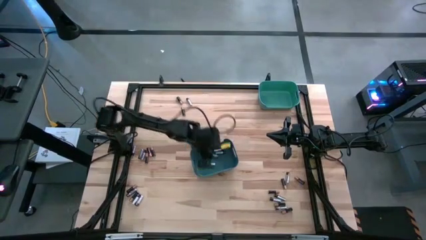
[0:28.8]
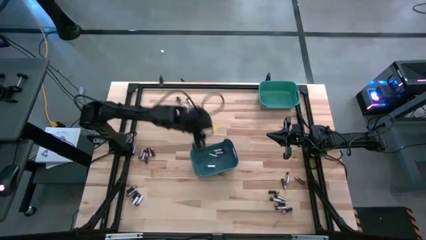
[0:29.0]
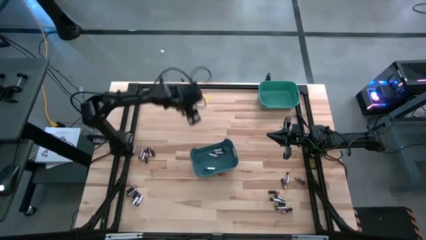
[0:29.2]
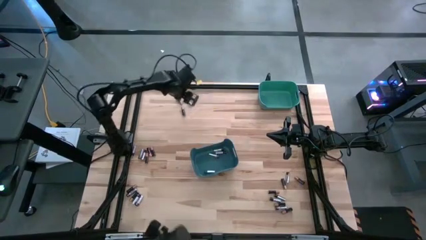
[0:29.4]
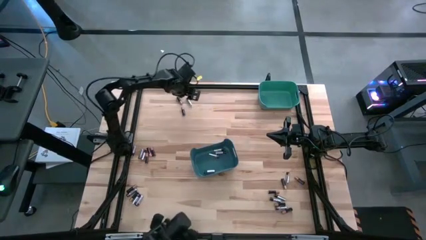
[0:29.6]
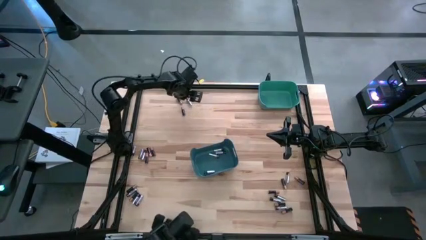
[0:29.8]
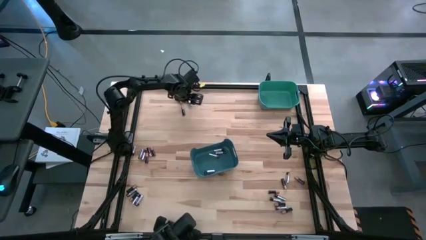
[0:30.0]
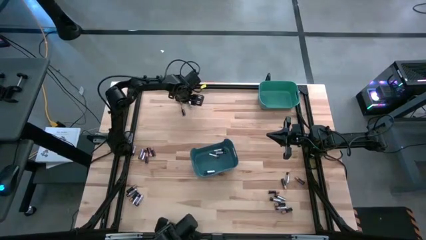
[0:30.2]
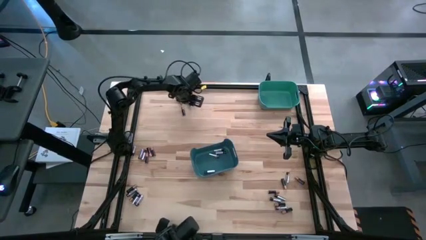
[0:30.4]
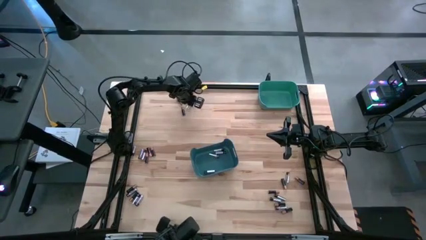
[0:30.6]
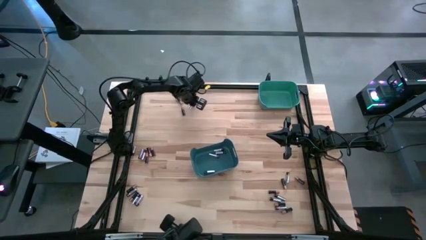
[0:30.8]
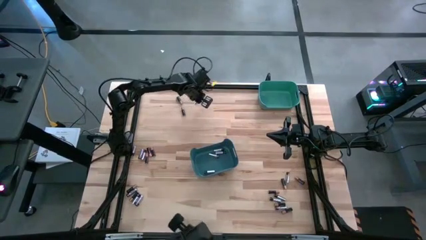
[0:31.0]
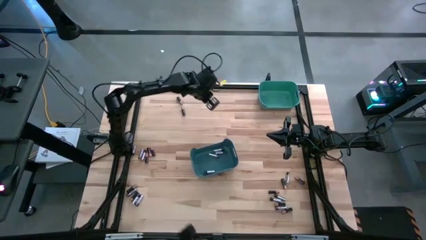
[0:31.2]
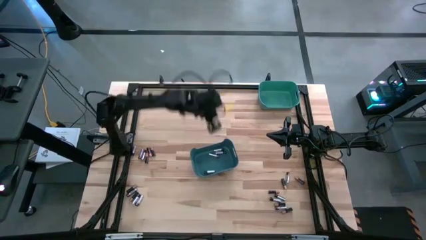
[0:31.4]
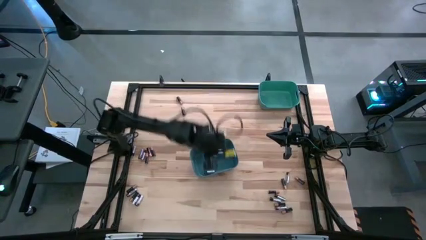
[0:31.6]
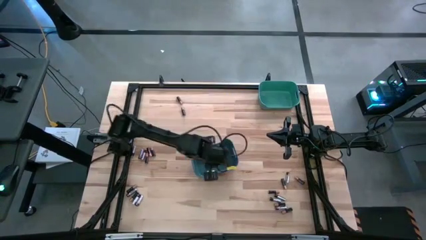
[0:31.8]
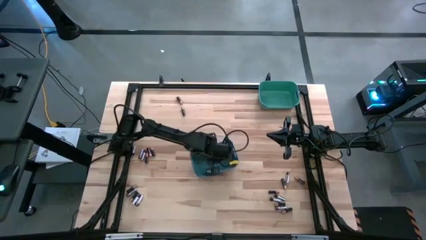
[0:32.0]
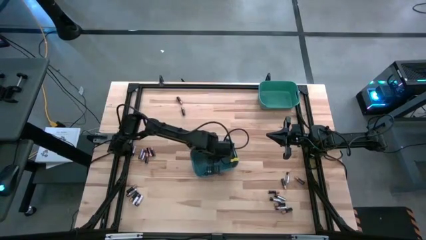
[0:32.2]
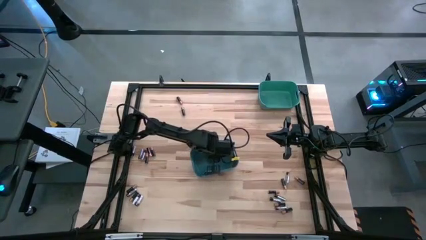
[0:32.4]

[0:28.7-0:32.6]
Task: Sort batteries
Put the silver battery into the blue bin

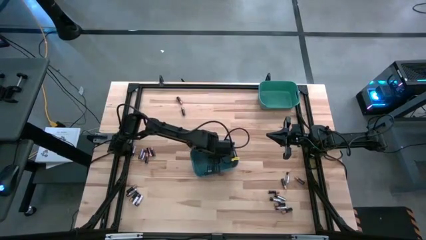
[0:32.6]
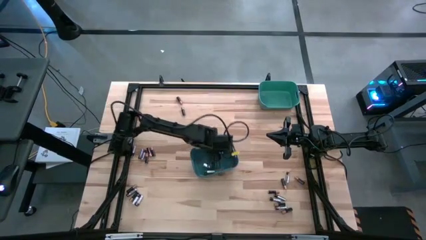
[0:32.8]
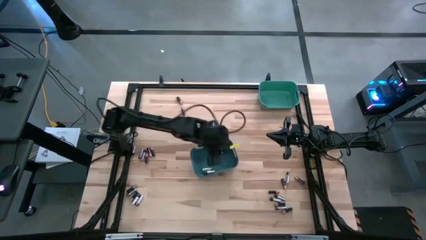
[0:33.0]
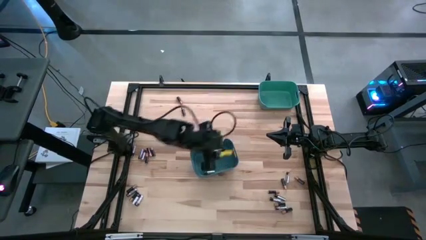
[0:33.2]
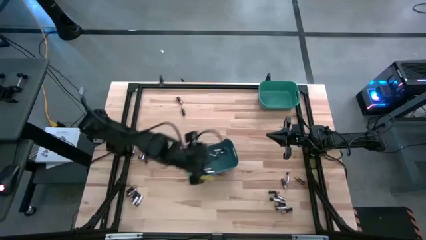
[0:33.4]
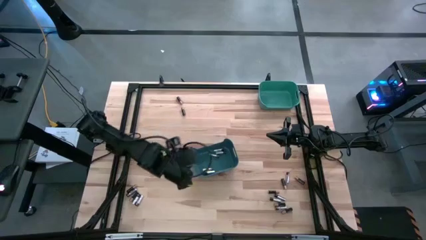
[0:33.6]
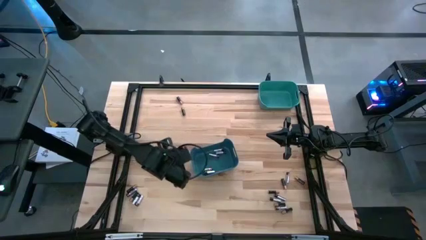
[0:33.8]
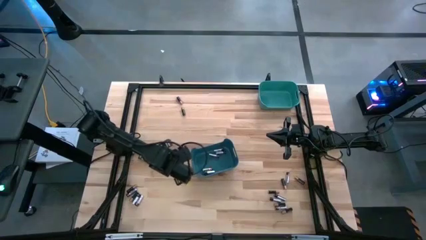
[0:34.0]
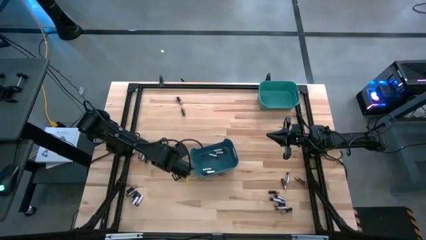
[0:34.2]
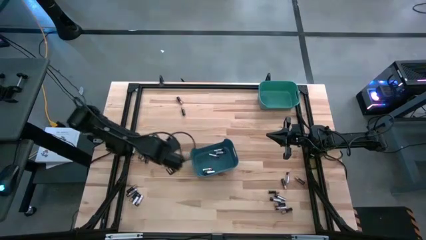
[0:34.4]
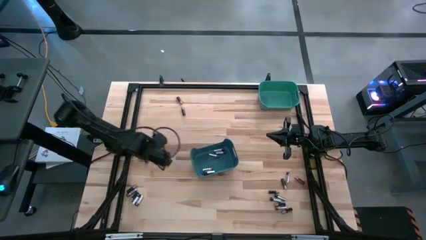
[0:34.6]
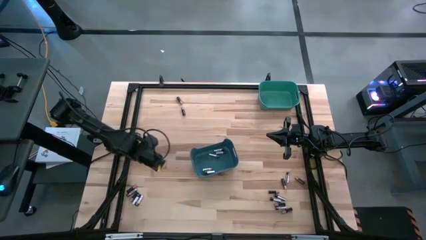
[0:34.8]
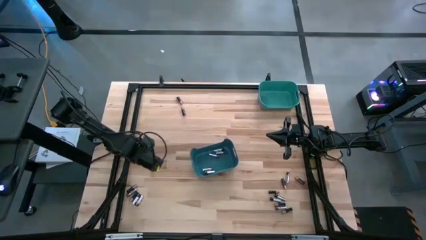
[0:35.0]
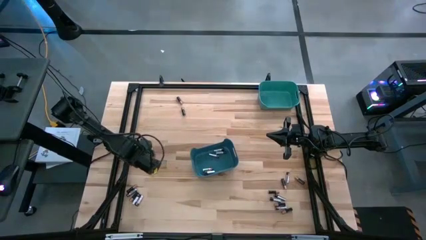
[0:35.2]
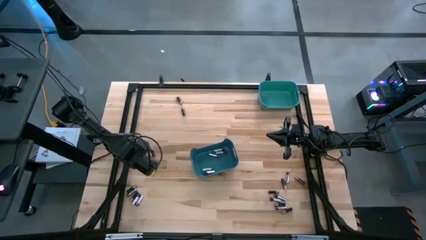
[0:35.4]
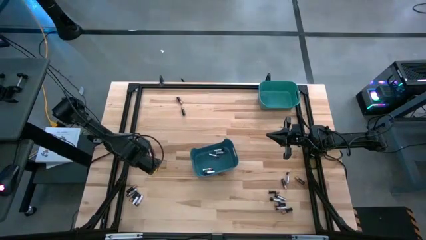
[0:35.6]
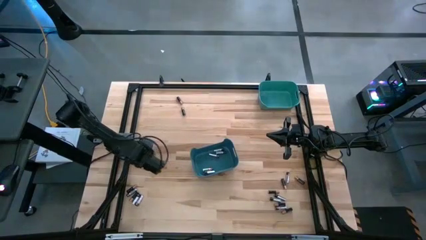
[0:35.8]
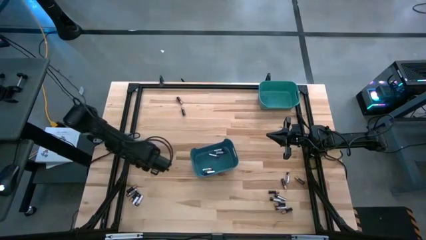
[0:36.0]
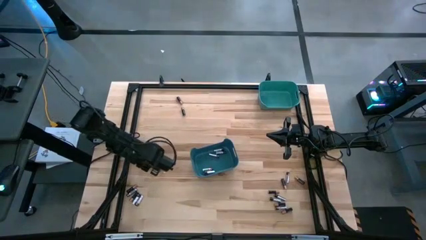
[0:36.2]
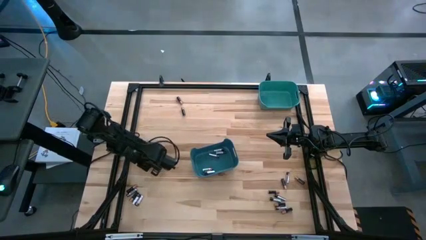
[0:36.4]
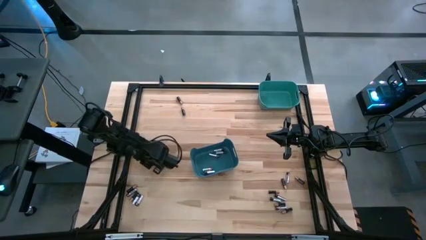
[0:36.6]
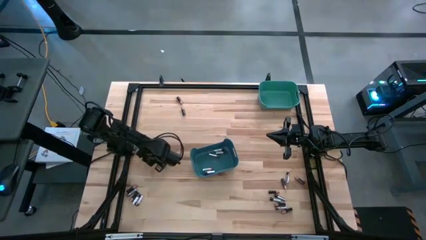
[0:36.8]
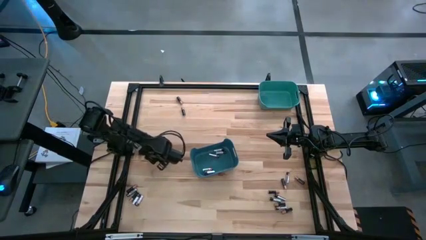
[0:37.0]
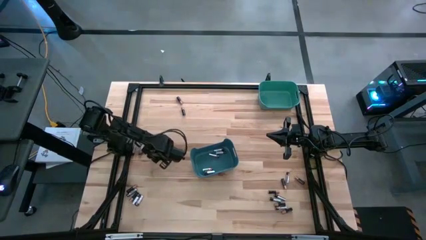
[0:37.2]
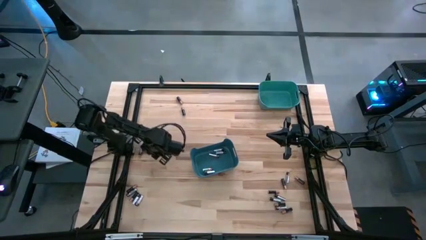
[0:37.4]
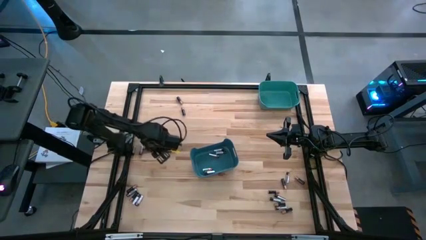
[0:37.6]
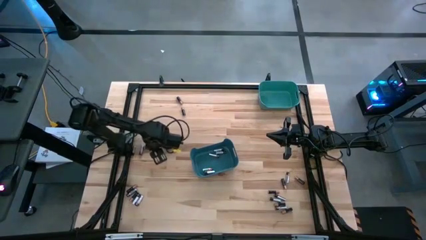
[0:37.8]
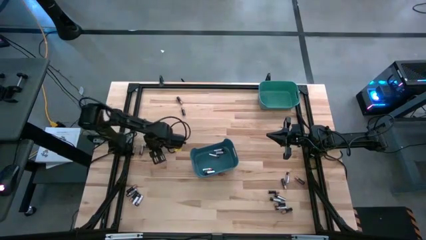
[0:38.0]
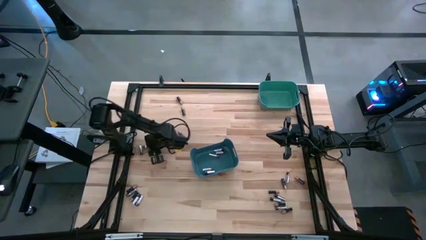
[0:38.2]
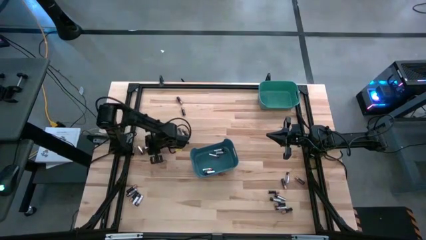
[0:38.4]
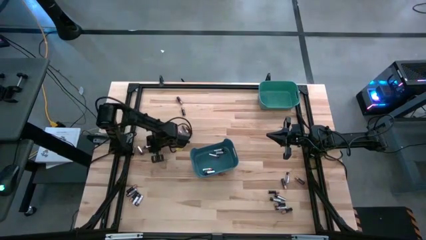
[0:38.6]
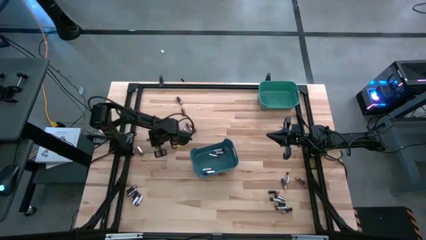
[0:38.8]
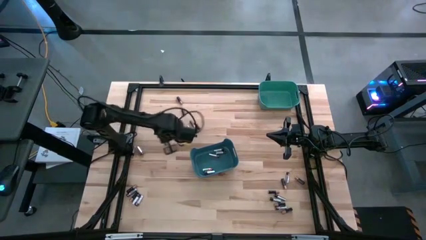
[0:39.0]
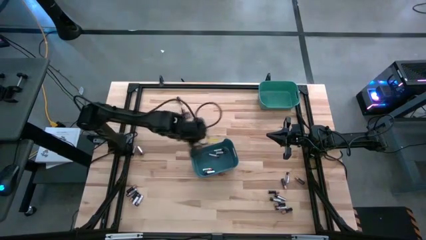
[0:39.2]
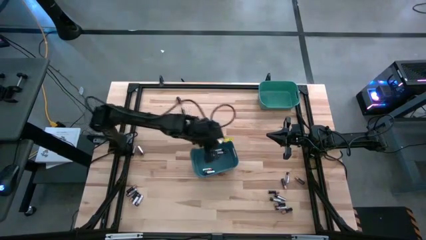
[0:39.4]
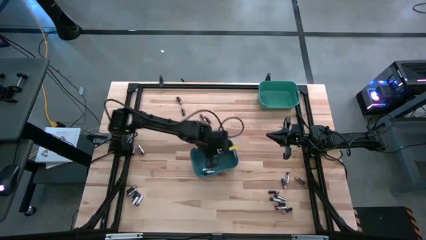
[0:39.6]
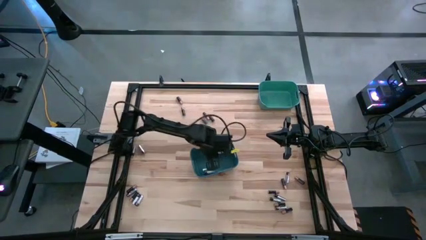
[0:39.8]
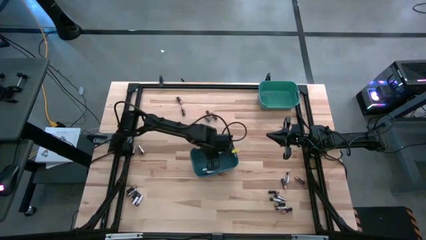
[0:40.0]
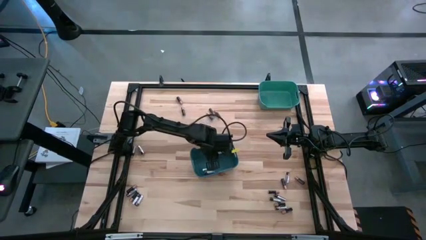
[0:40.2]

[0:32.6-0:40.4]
Put the silver battery into the blue bin

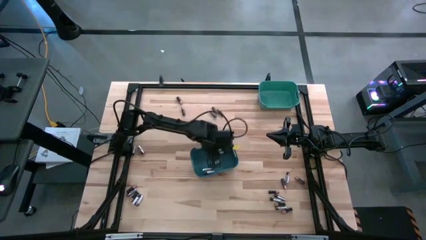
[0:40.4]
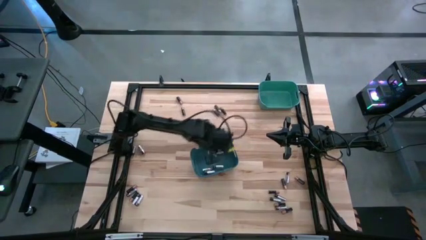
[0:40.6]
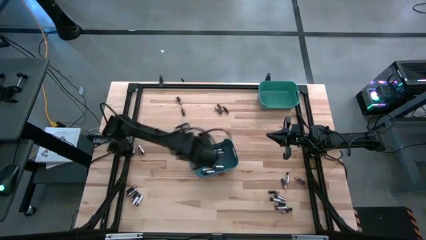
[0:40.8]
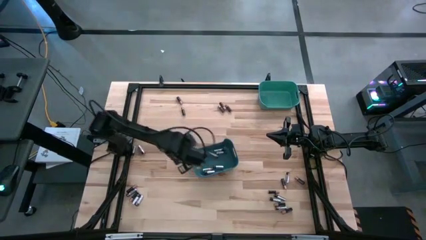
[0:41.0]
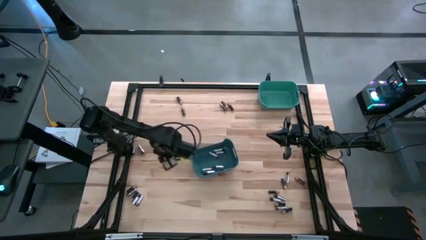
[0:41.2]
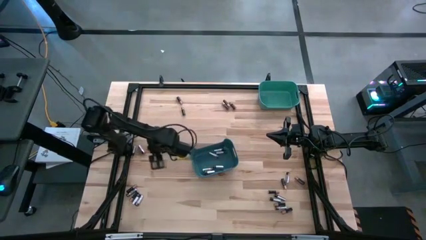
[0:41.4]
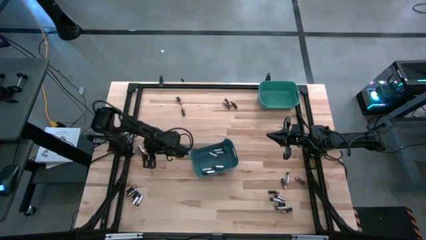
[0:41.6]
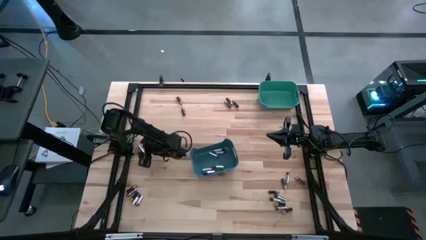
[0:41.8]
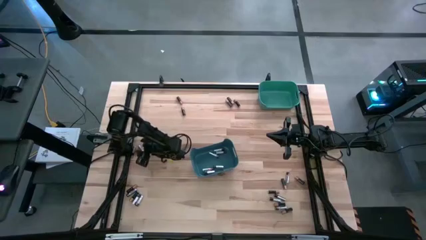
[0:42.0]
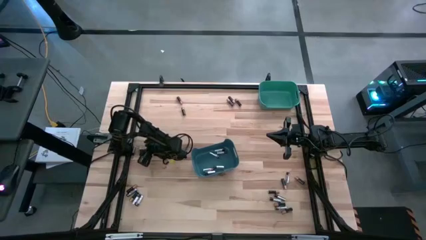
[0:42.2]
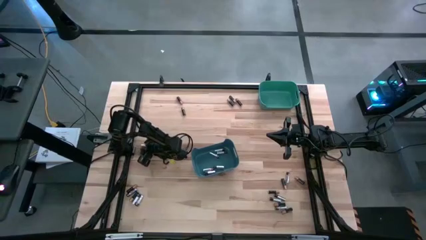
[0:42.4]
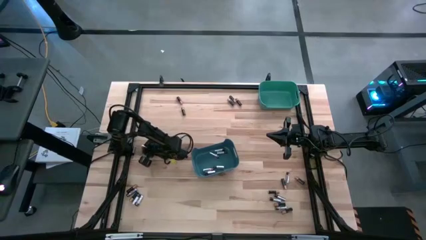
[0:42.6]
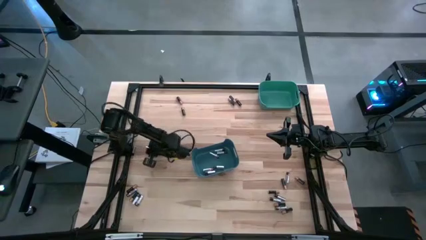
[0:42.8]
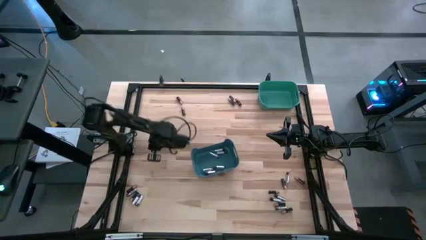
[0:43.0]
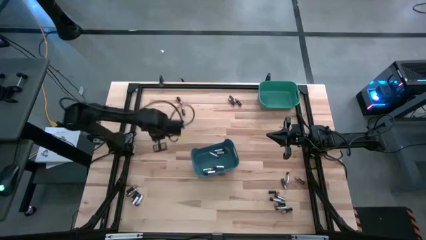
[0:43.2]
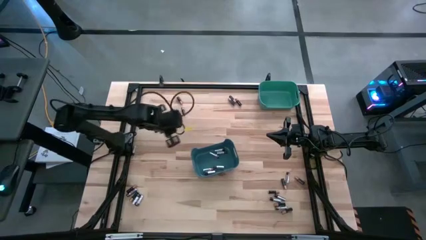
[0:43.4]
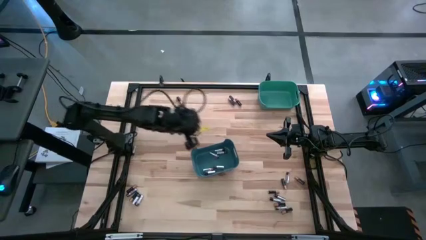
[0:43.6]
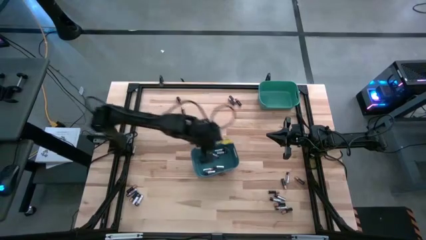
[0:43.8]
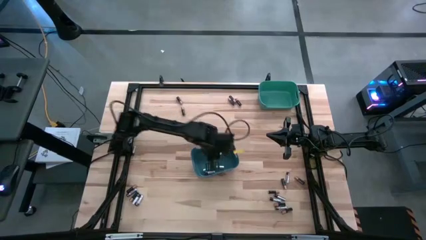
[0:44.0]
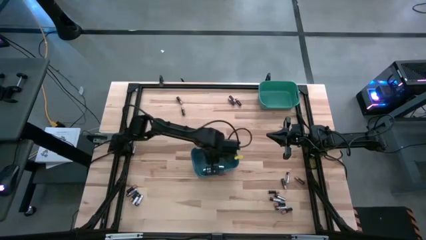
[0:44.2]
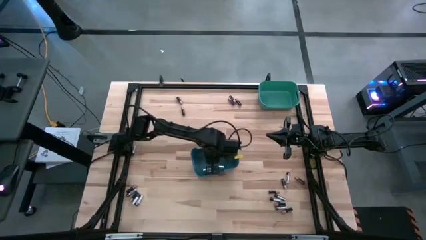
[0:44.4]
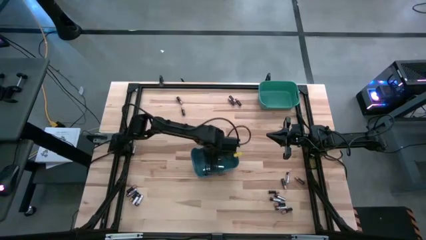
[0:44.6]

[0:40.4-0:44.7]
Put the silver battery into the blue bin
